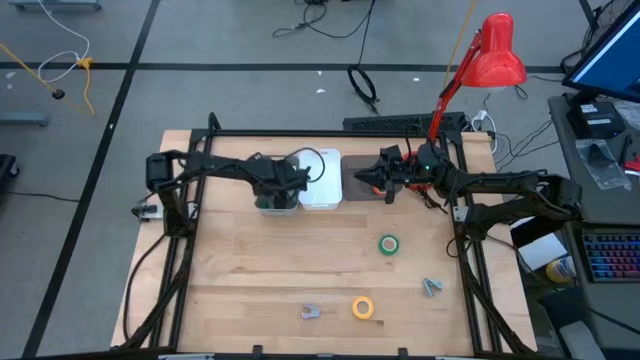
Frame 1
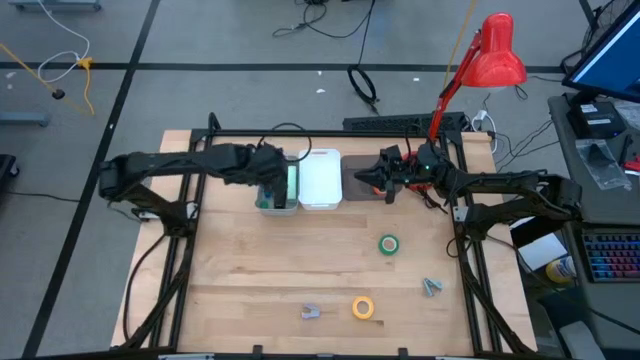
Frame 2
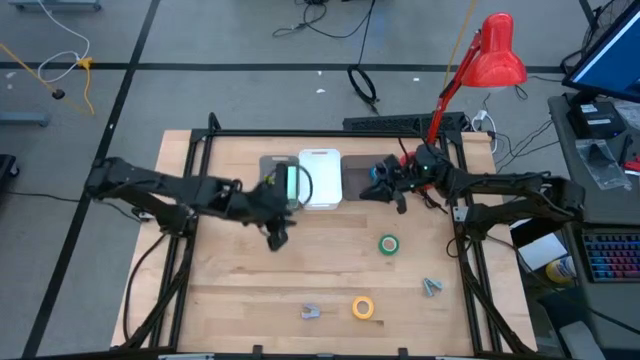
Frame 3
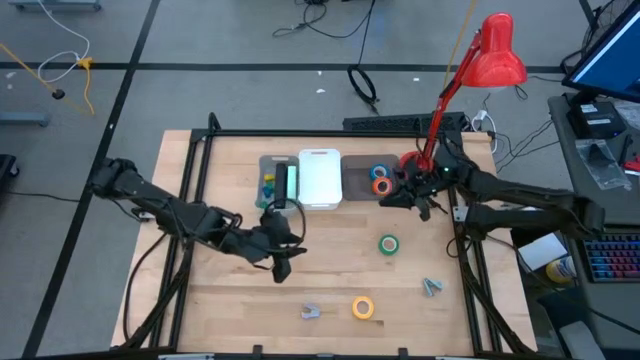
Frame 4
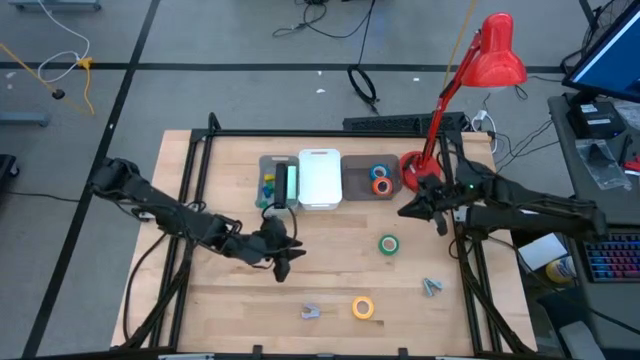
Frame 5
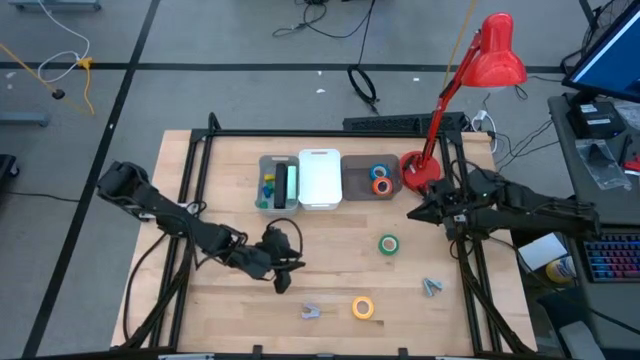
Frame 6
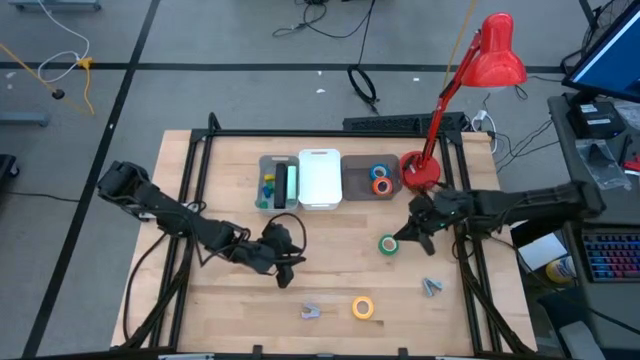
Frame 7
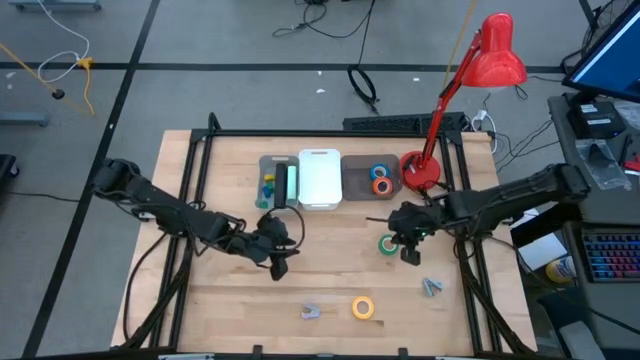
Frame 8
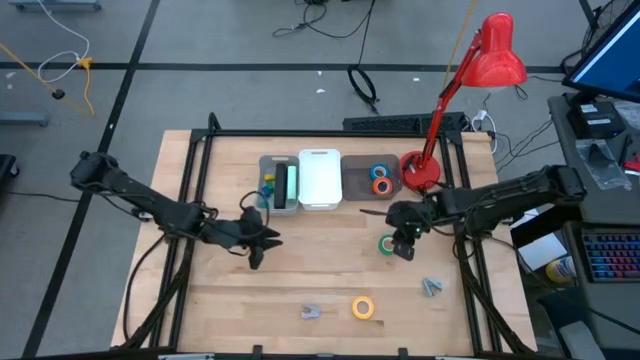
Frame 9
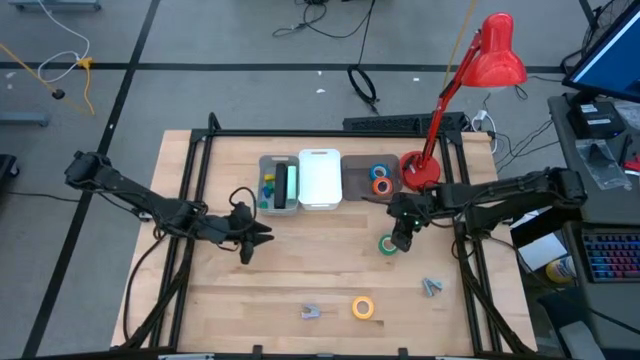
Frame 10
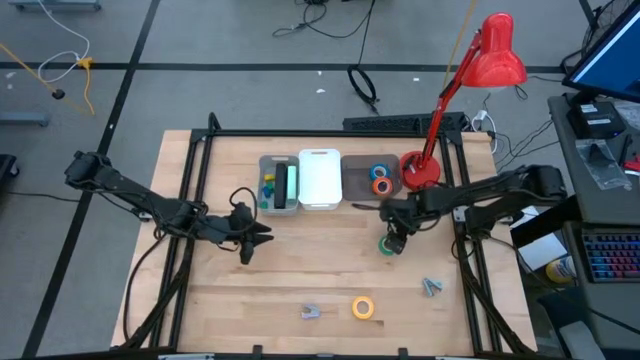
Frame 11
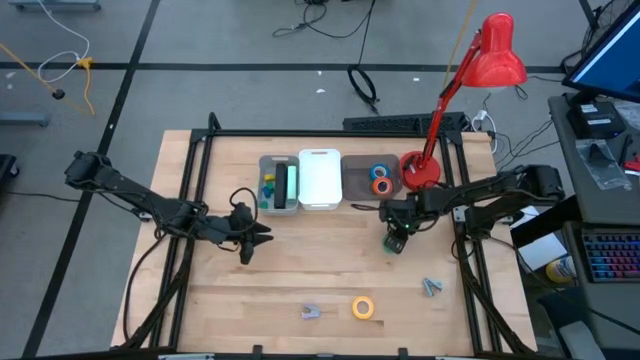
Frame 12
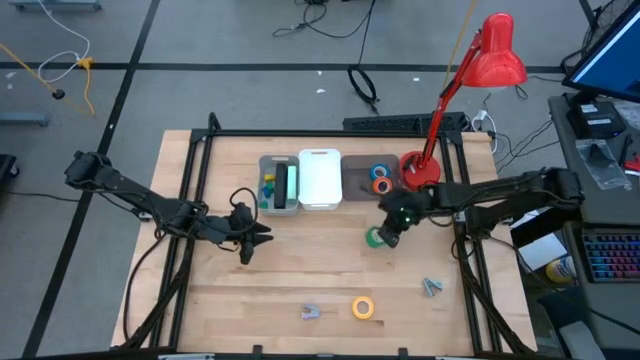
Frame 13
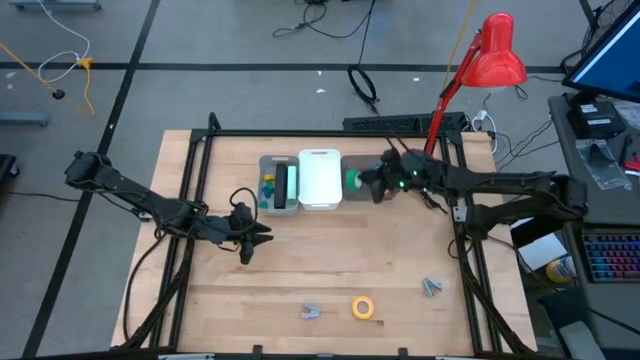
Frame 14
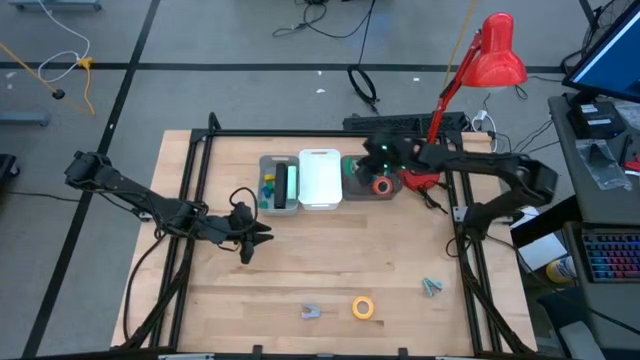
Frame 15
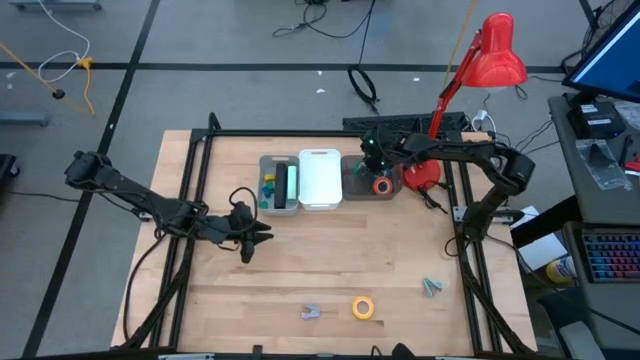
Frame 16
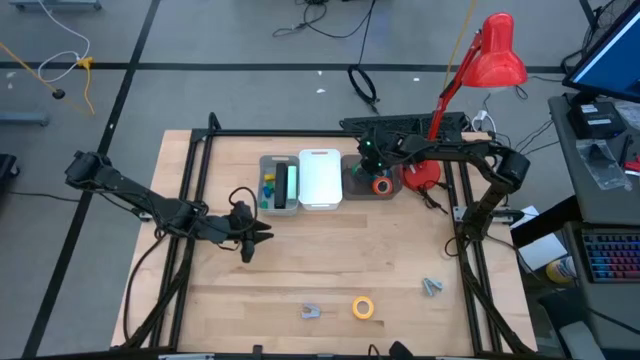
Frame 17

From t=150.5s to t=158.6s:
Task: Pick and place Stapler, Stapler remover, tape
Put the green tape into the black bin

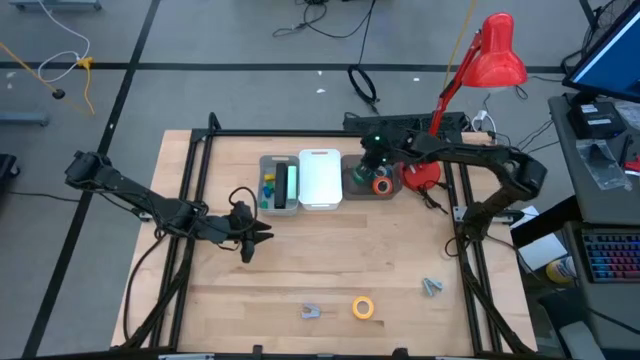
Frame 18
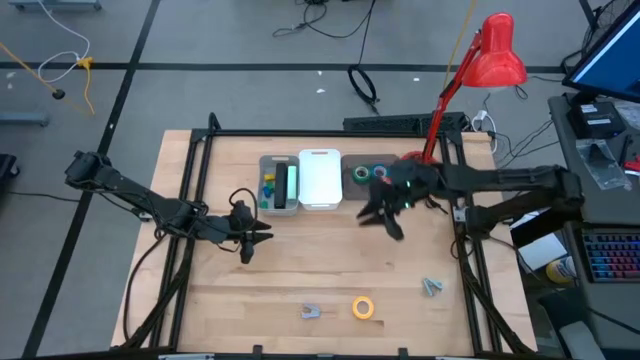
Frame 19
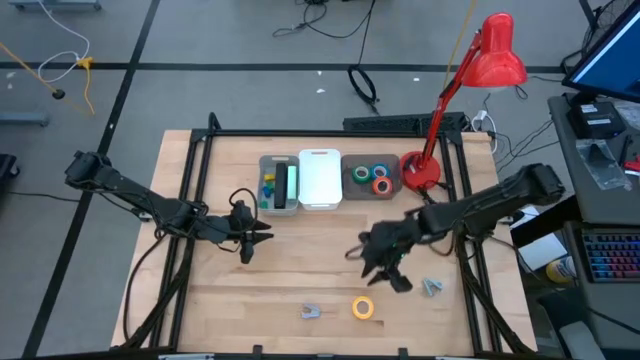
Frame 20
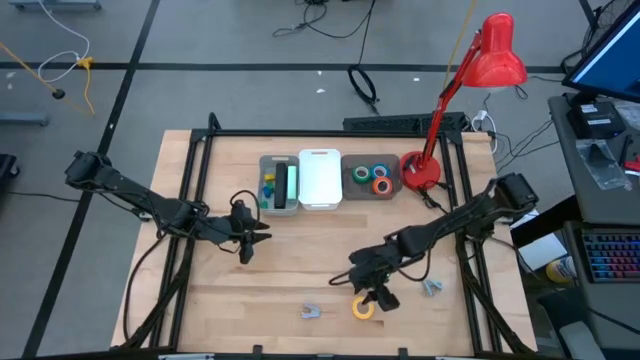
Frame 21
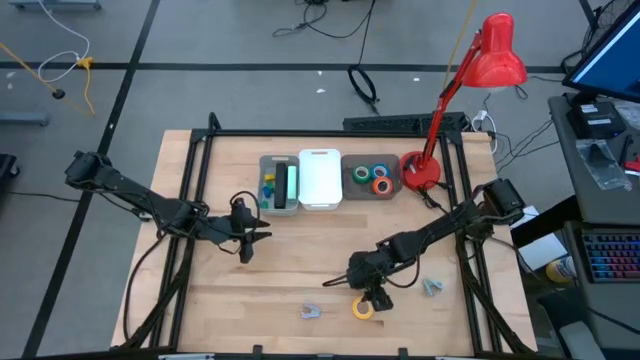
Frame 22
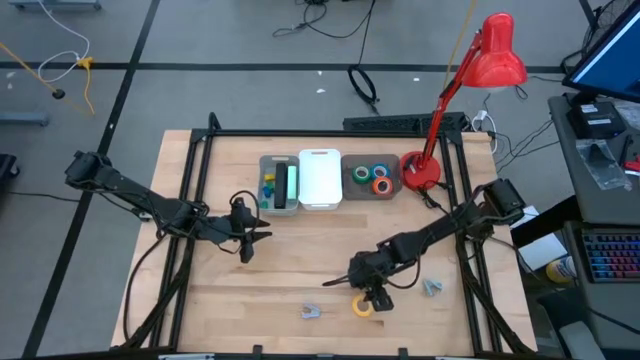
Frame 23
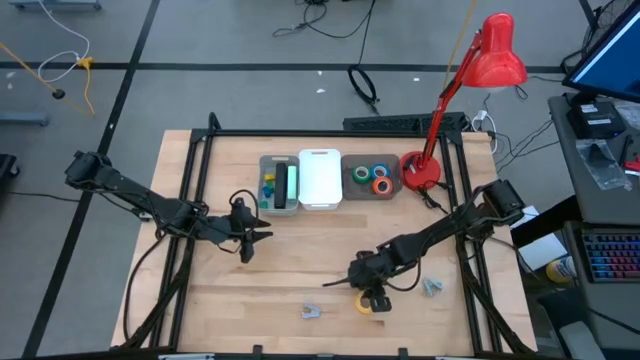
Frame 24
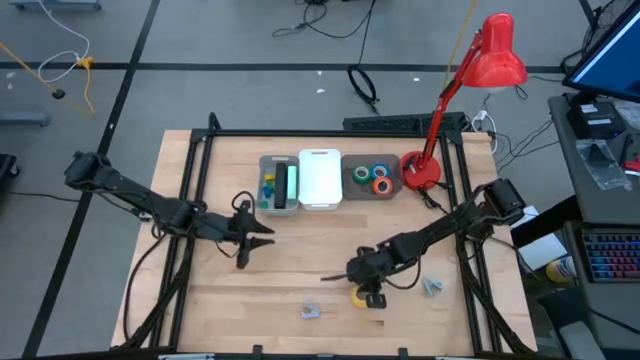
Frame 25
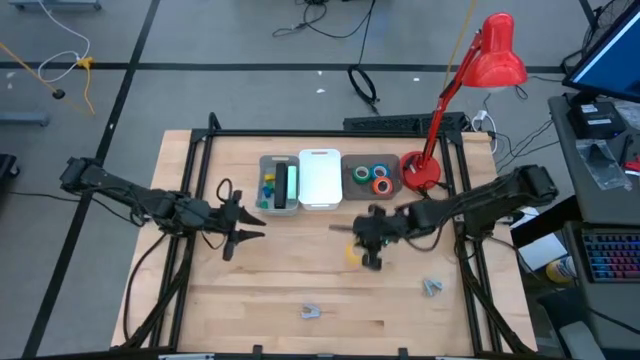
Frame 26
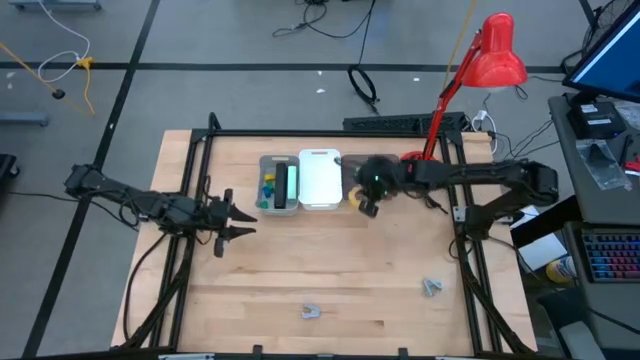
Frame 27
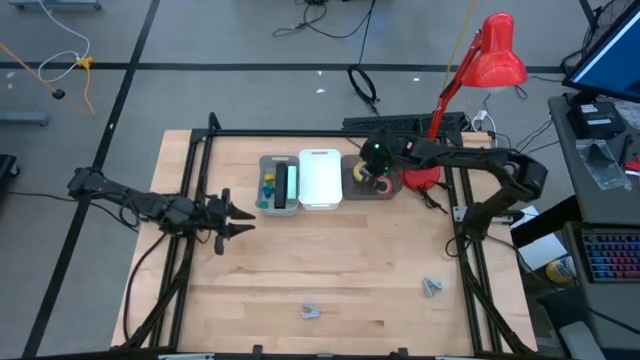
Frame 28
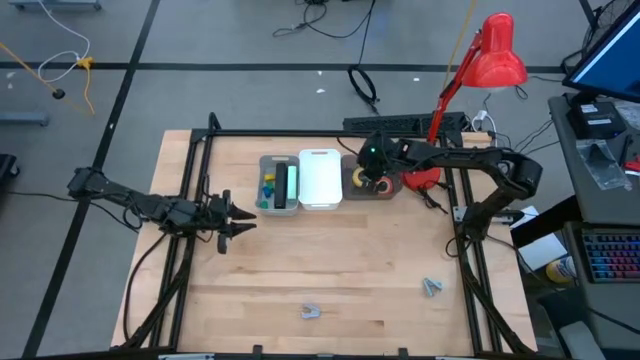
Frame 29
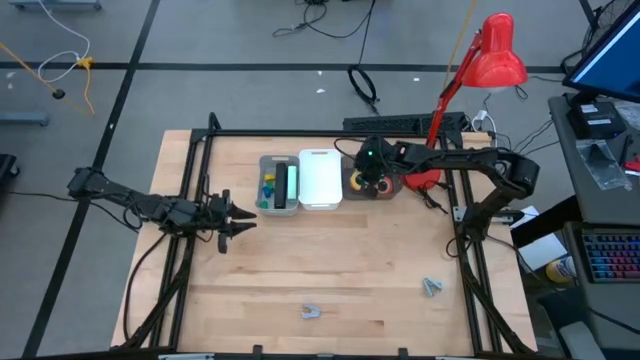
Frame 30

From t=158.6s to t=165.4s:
Put the yellow tape into the black bin

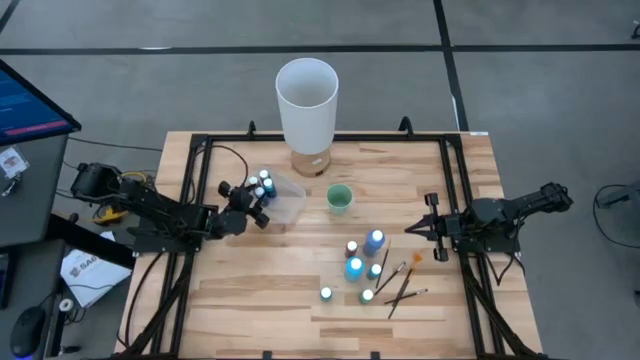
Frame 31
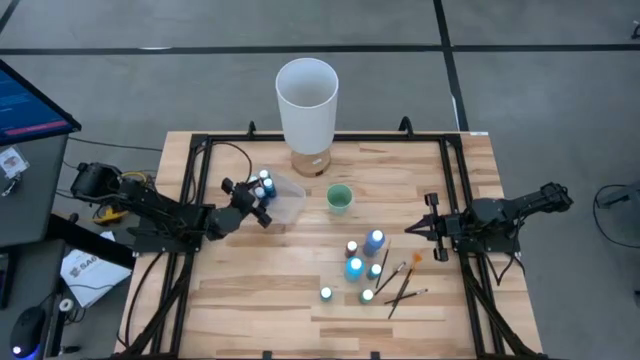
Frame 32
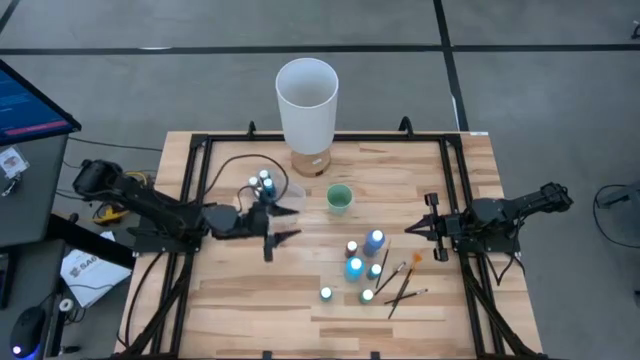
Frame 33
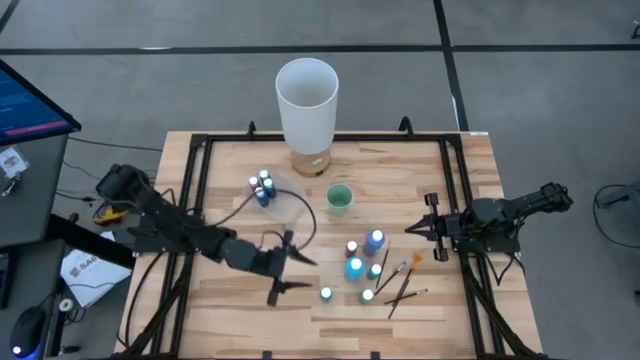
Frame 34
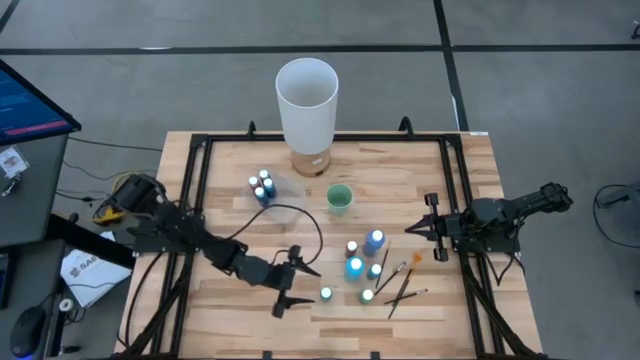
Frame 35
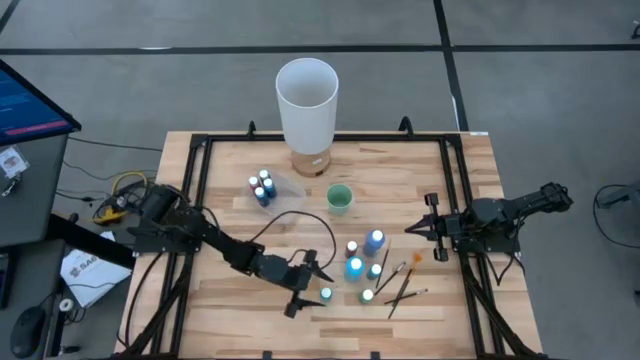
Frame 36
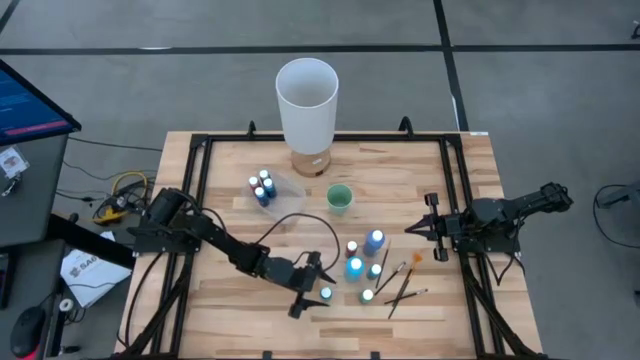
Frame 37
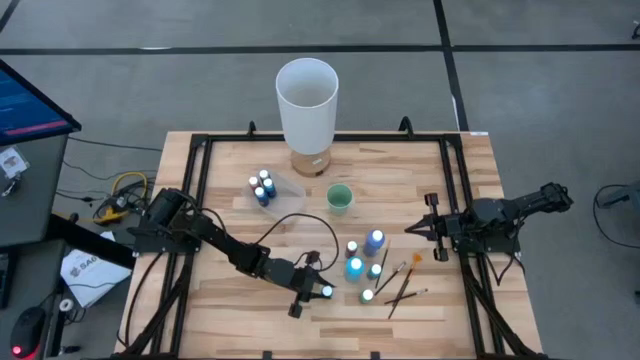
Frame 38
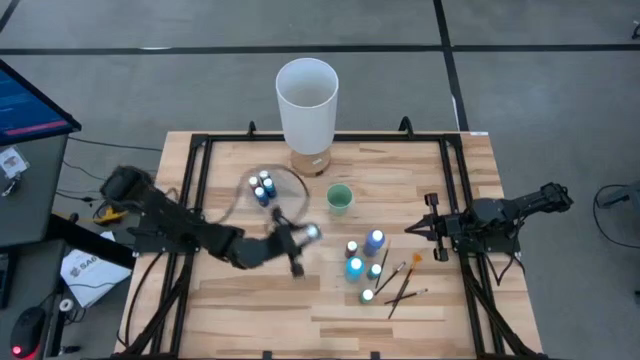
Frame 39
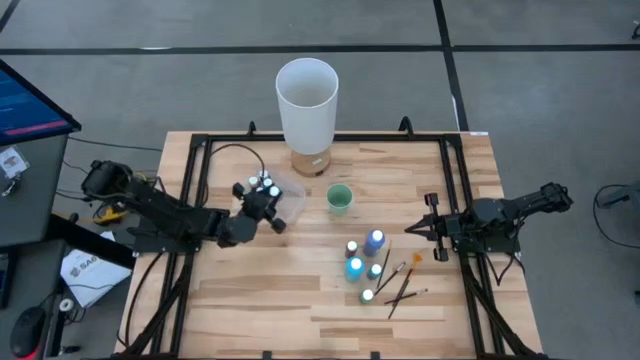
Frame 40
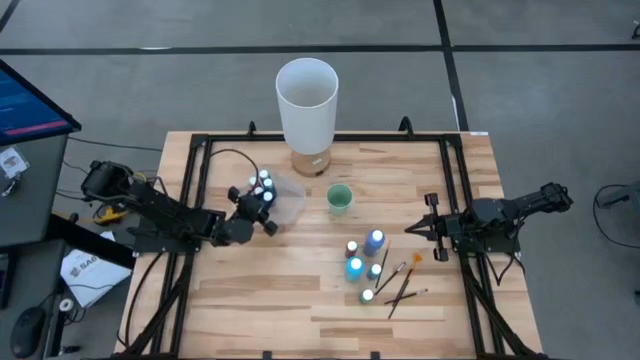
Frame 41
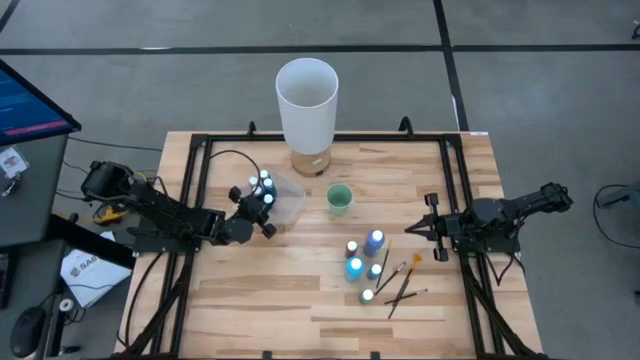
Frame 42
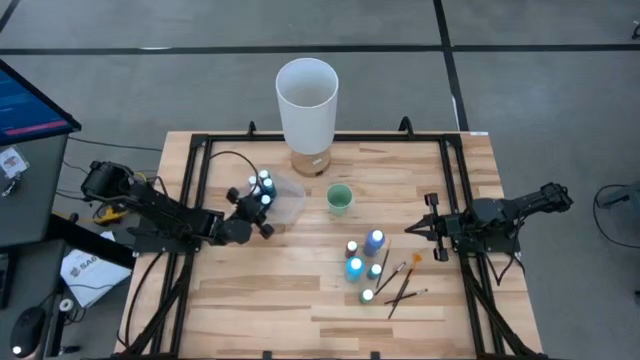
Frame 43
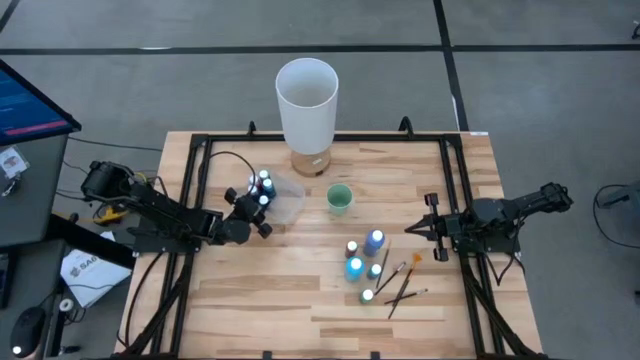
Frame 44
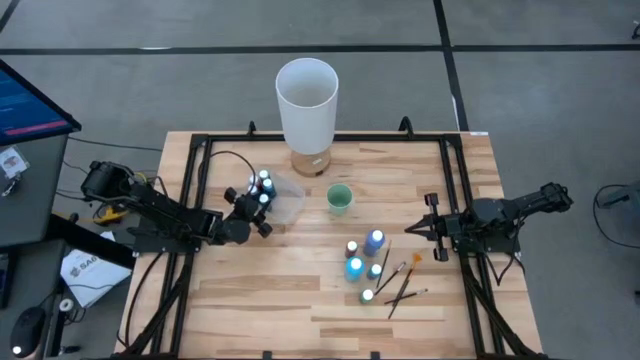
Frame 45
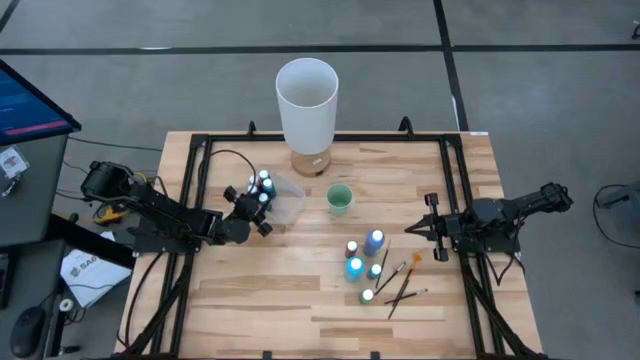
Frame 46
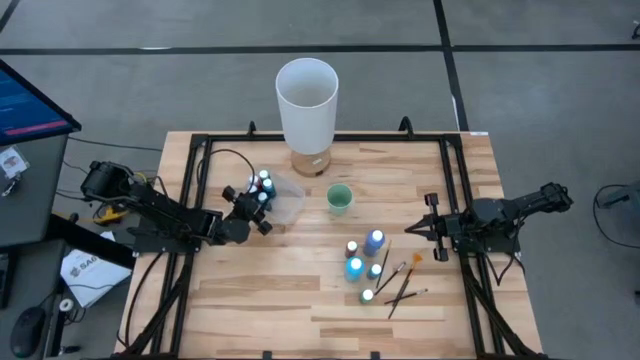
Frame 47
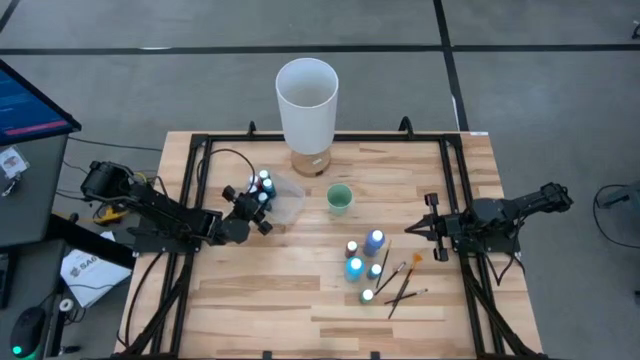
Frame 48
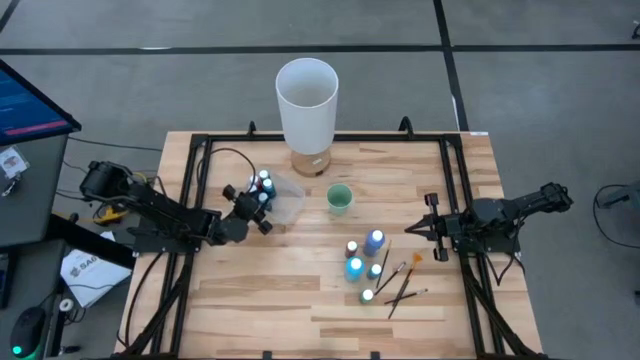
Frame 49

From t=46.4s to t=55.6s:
Task: Pick & Place Paint Supplies
Put the dark green paint bottle into the transparent bin
